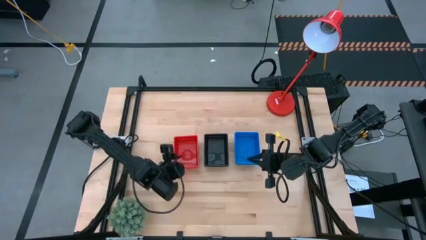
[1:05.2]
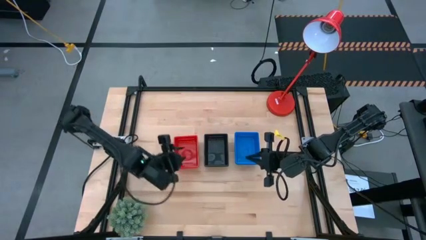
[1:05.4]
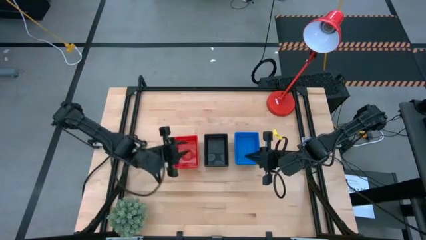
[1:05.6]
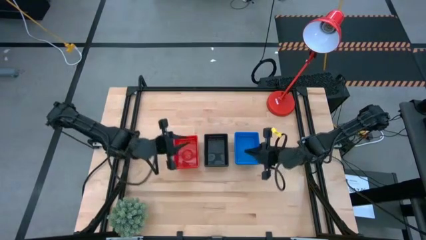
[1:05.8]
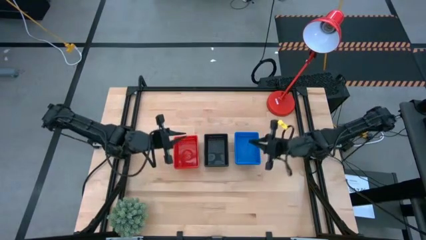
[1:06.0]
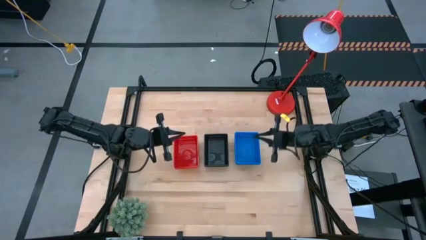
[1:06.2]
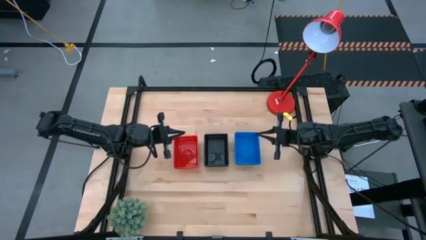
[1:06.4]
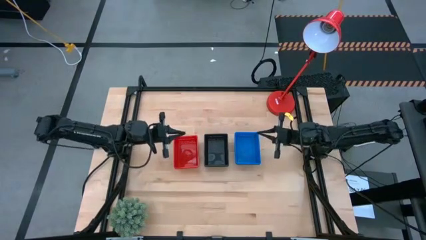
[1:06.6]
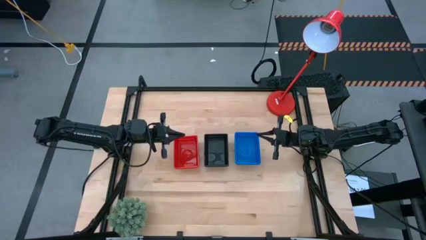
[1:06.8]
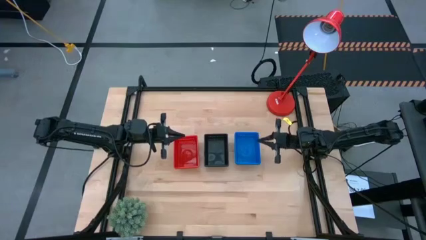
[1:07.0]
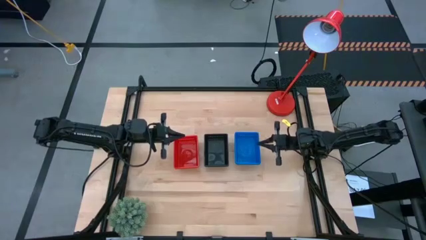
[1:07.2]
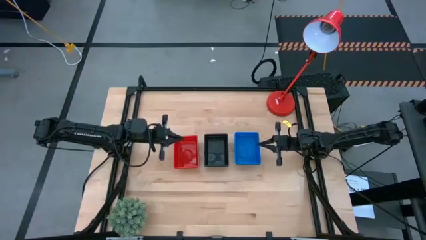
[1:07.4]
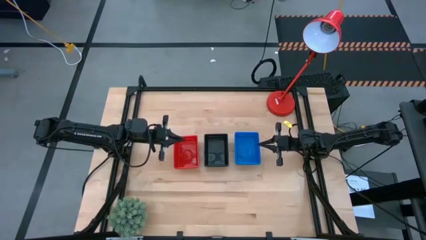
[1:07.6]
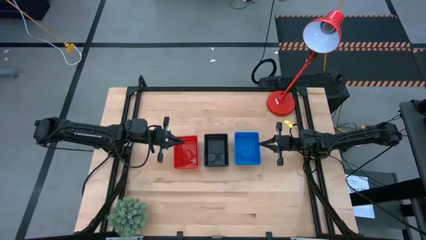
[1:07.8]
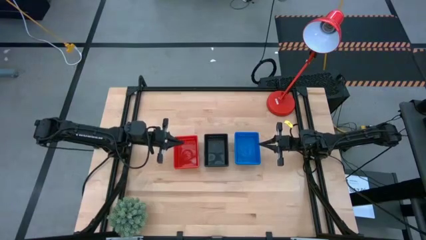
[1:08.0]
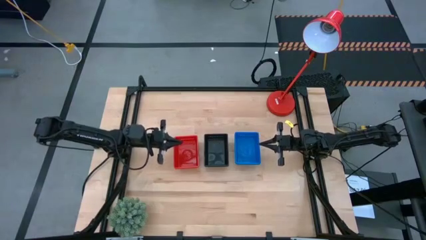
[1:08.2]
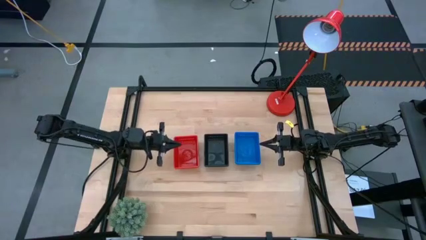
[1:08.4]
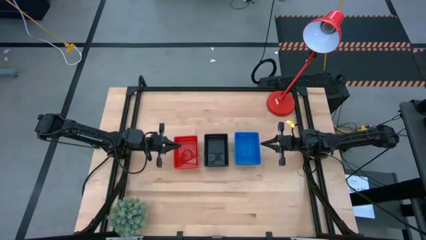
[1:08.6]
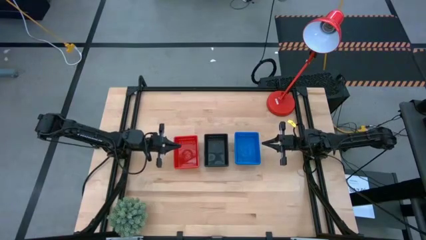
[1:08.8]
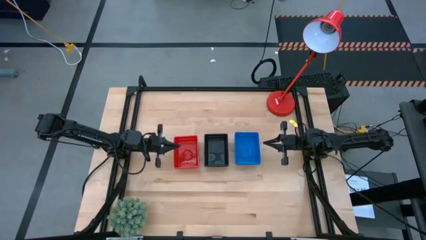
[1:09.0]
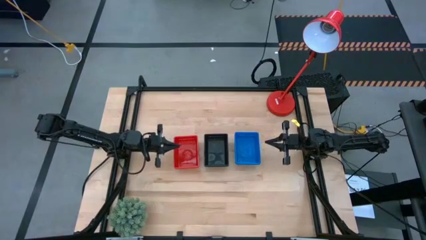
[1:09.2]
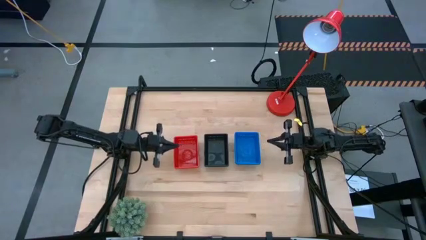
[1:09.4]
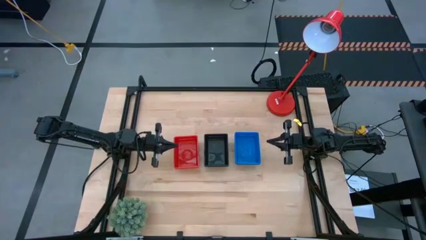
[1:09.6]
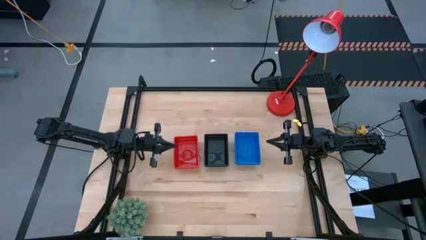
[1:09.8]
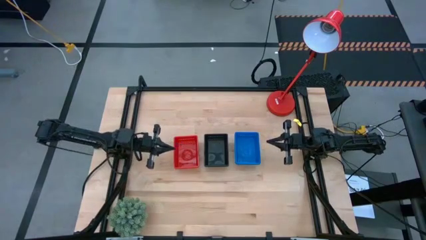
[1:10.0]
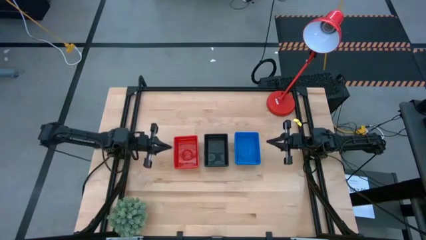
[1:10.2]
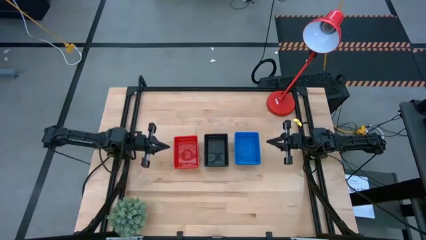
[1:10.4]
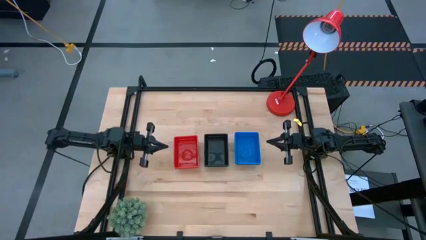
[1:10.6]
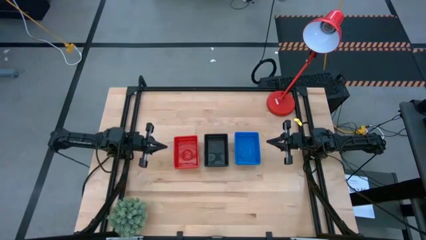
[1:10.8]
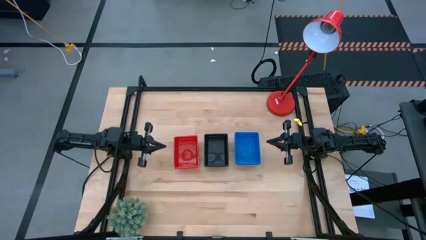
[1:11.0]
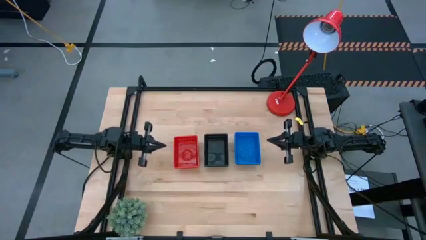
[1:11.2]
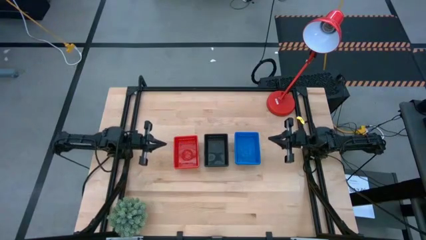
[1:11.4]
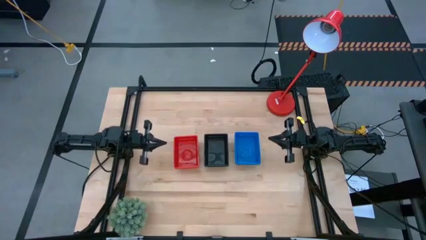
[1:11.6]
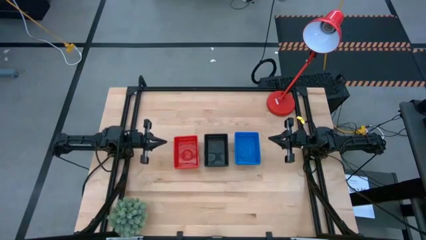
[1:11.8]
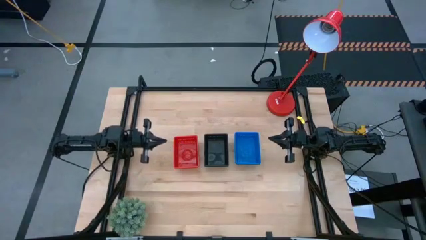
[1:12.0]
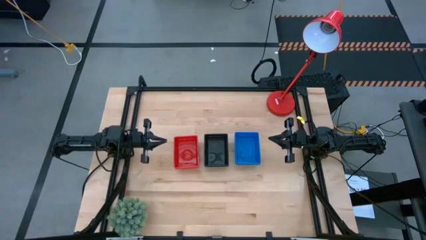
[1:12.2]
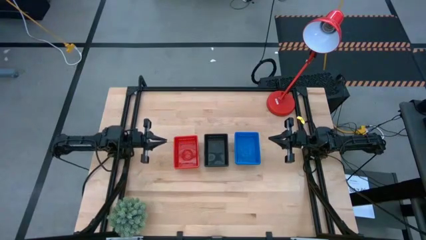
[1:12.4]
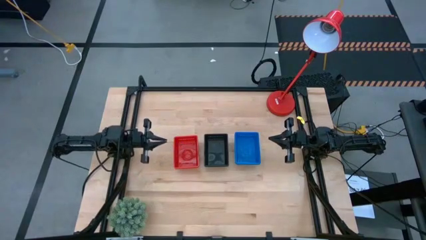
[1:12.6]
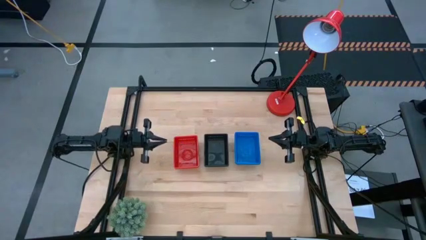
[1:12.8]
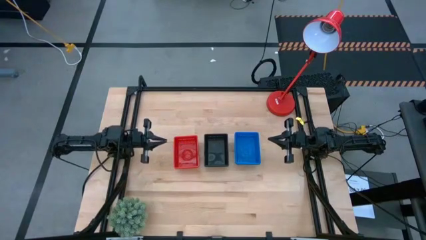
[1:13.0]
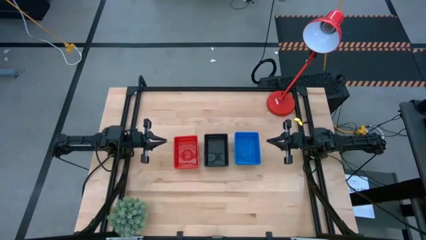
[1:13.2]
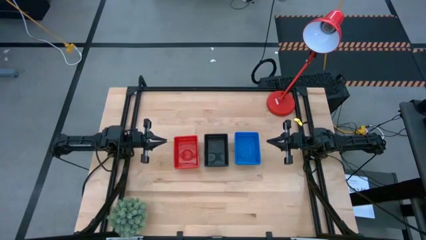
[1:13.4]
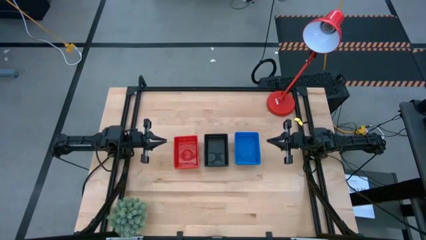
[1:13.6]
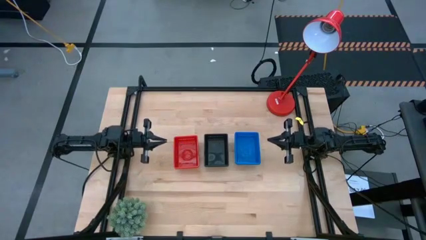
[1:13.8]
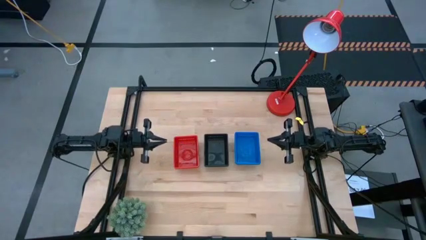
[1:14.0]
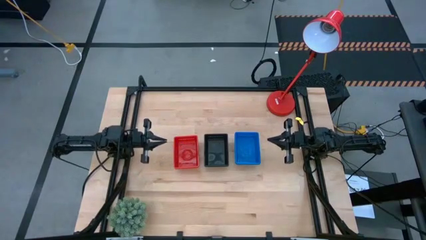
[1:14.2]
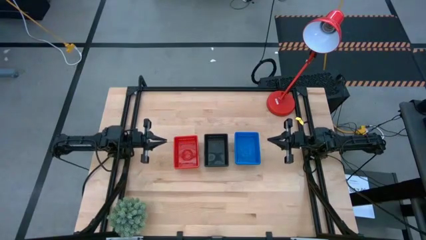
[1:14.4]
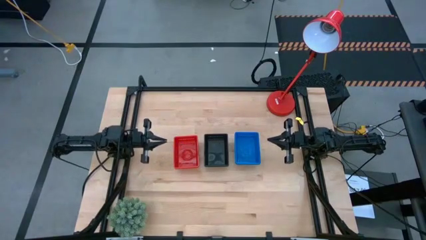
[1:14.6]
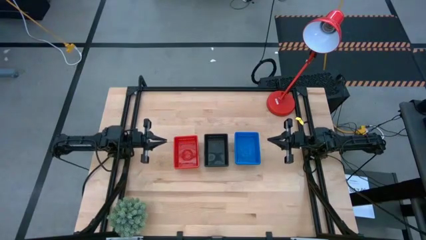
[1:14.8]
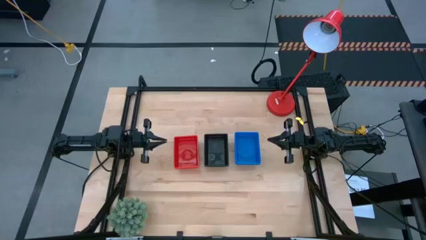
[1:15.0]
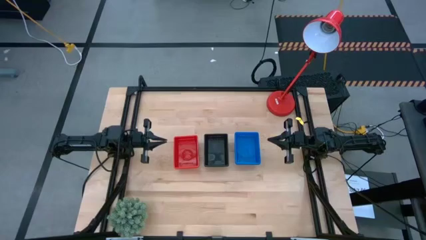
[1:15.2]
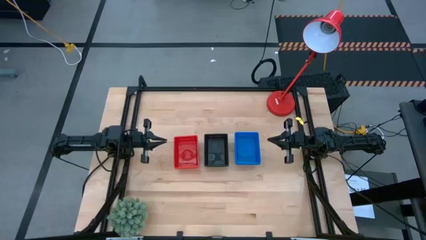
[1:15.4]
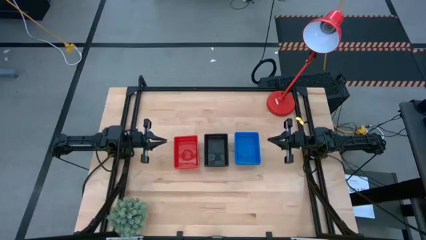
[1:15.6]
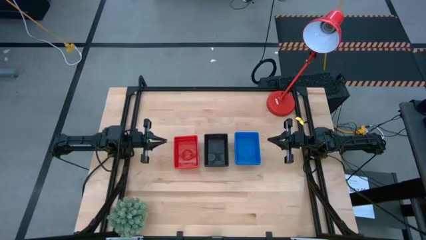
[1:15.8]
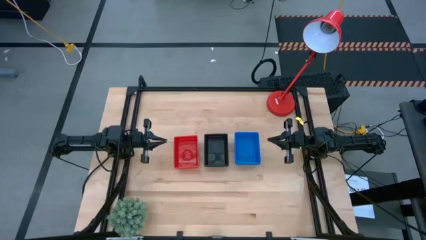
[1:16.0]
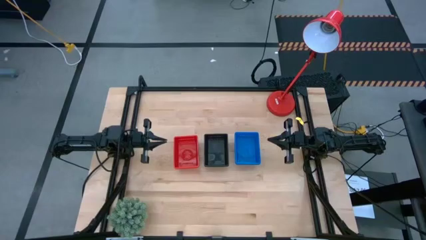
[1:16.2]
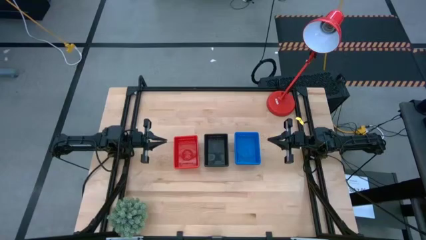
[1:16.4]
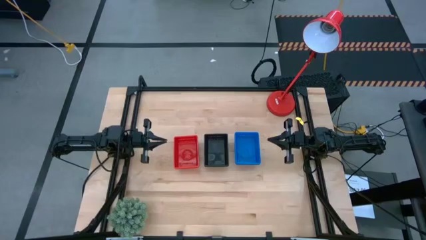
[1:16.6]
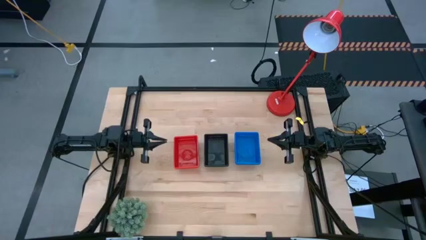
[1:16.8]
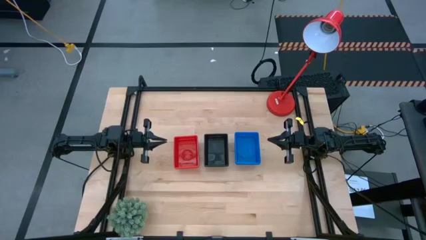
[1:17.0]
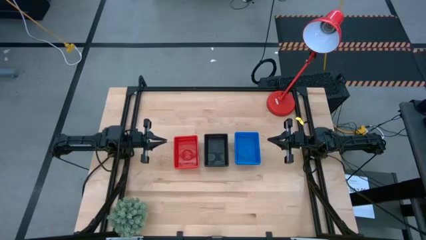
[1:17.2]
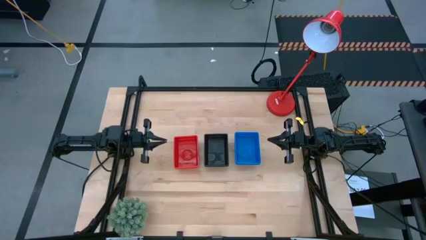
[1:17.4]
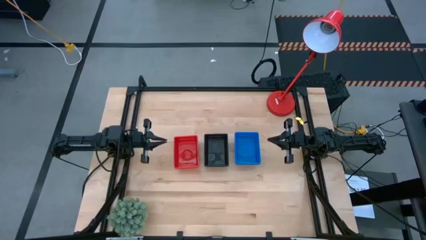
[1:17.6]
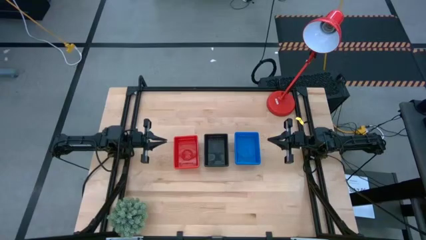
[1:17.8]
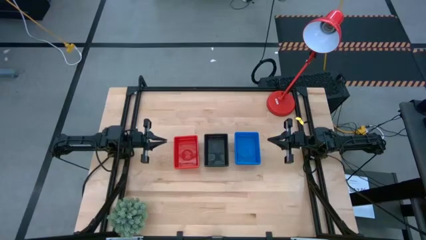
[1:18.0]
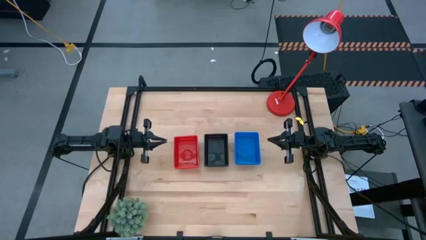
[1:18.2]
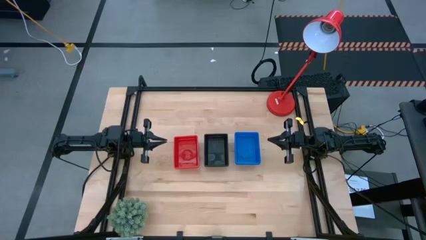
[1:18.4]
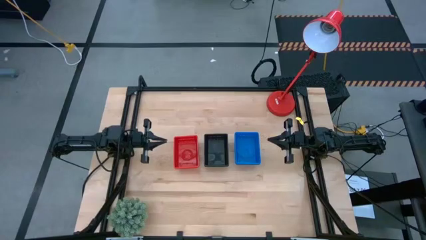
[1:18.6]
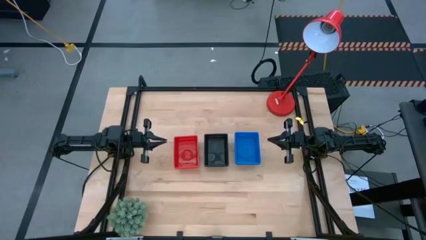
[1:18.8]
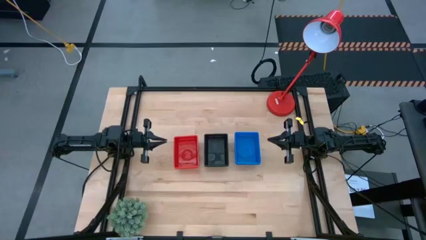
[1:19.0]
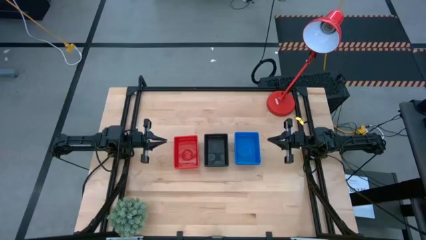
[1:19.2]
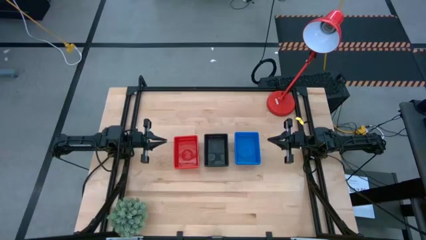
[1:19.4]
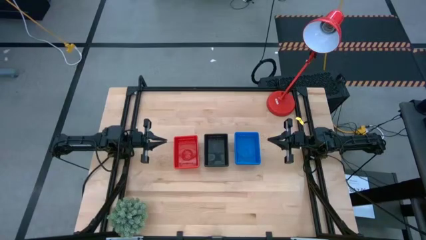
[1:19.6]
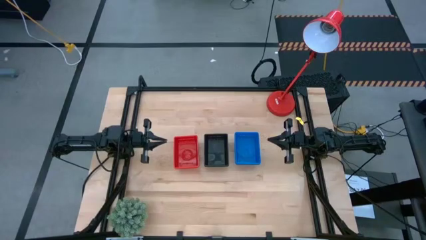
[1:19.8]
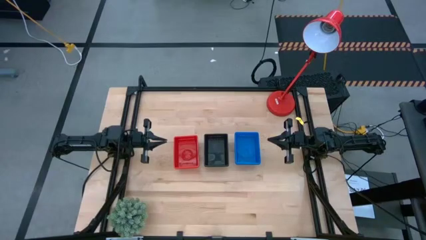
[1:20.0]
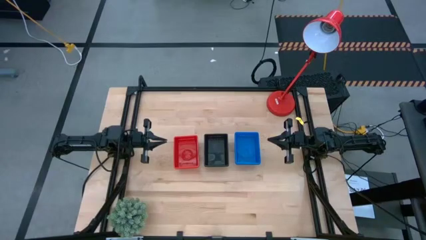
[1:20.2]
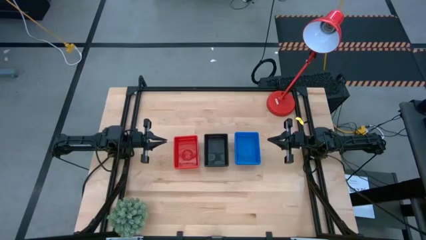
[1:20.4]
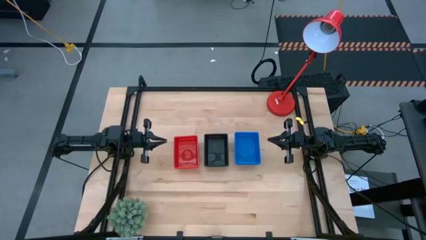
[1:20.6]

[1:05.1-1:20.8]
Return to Home Position
